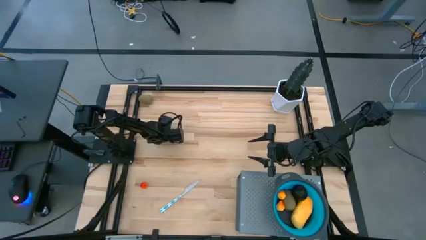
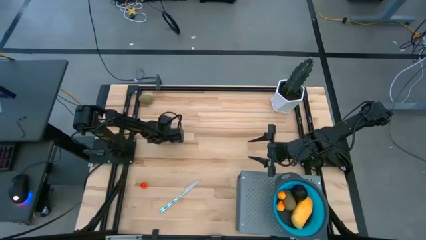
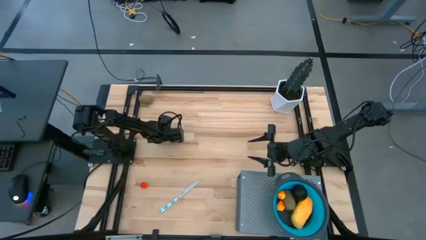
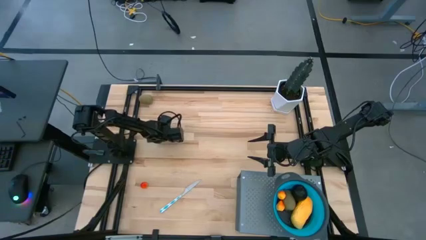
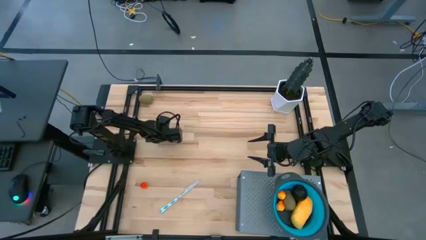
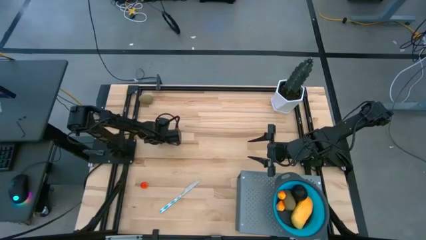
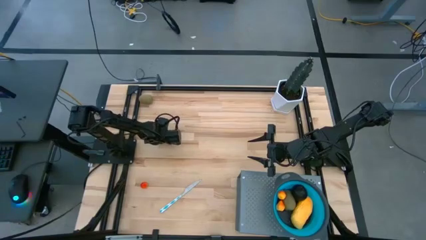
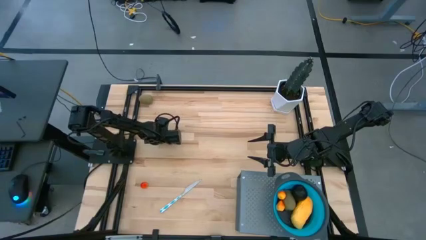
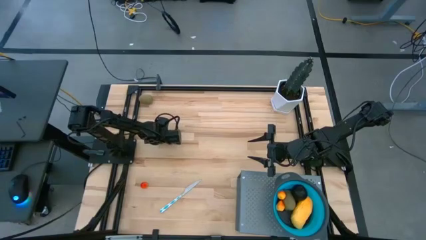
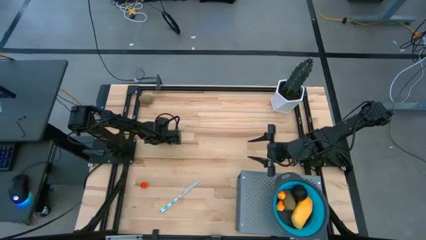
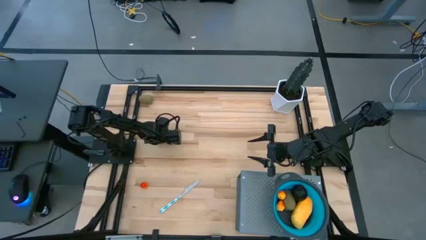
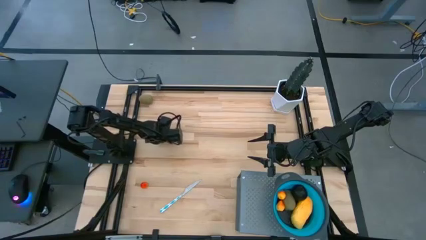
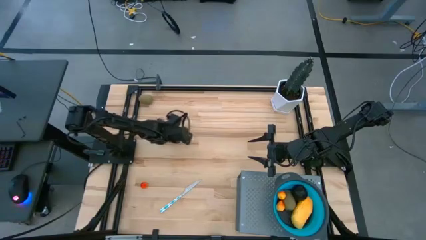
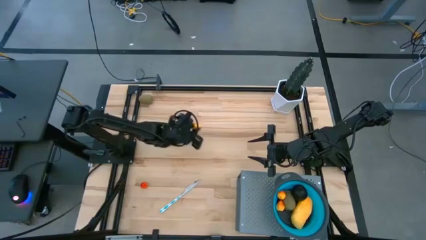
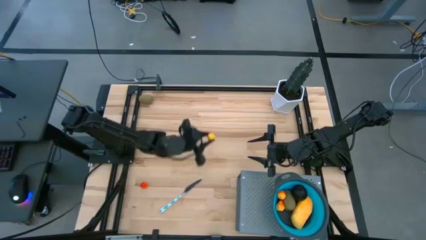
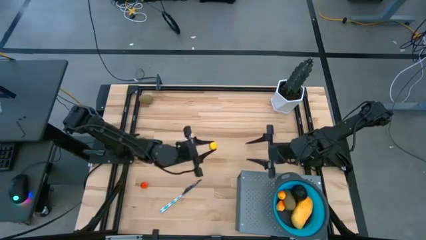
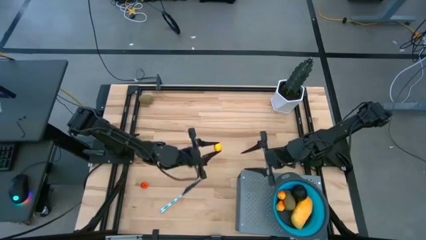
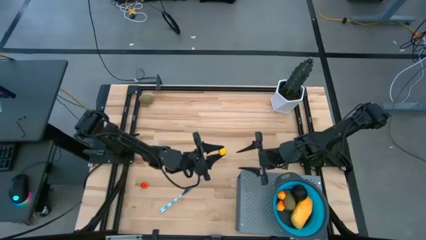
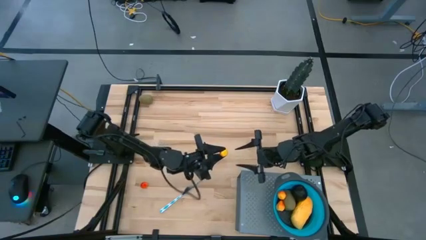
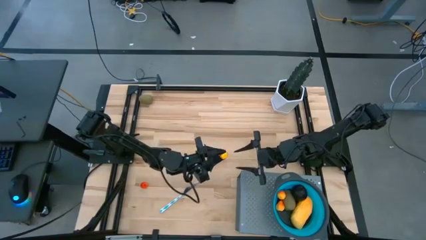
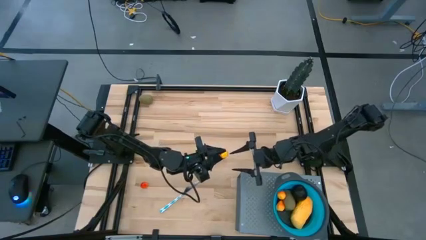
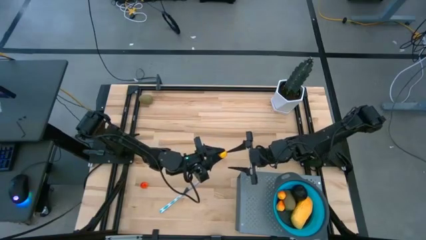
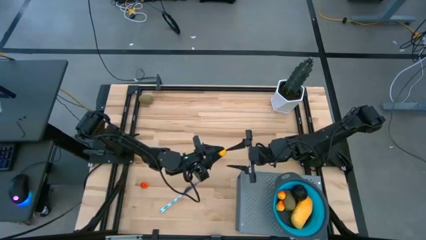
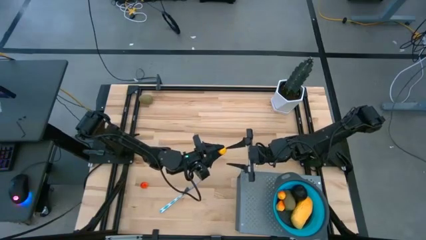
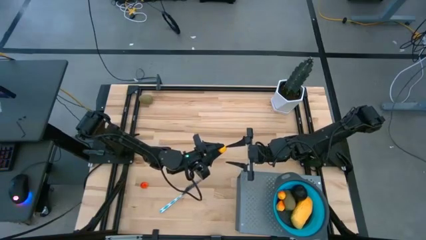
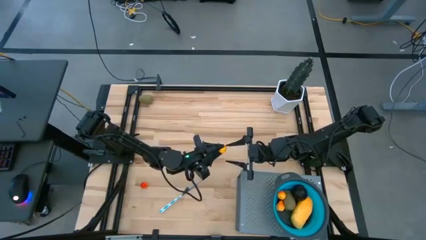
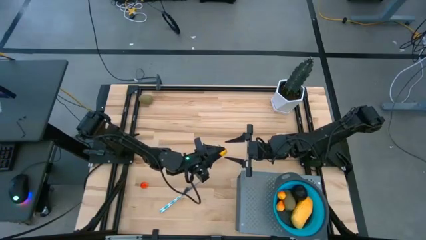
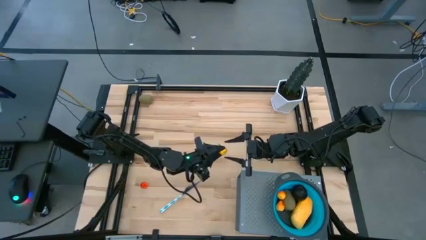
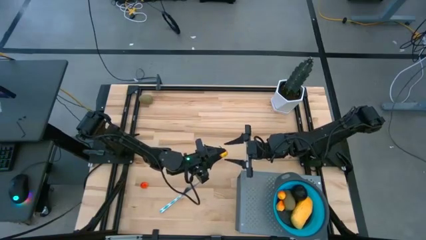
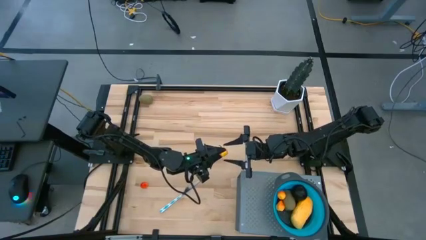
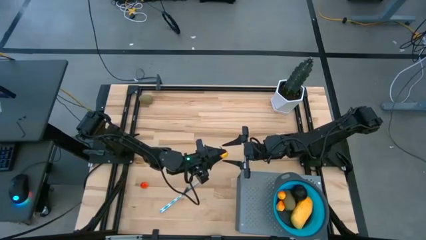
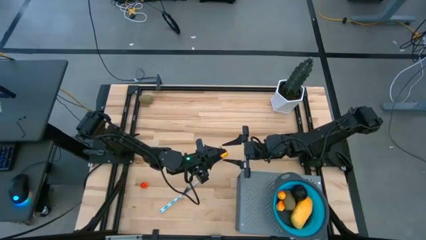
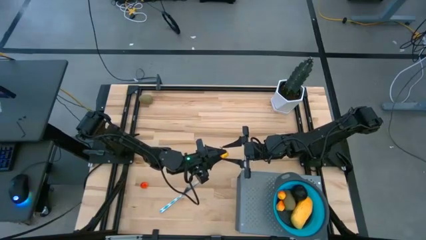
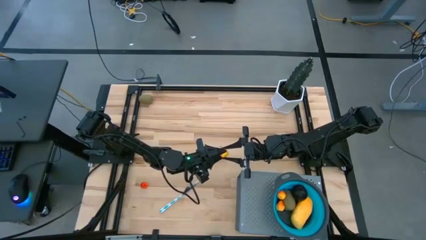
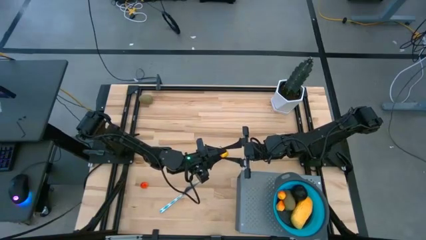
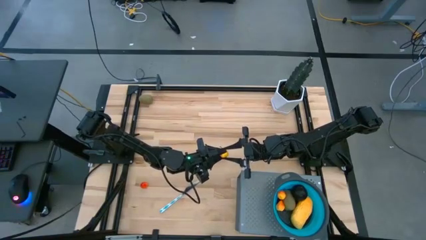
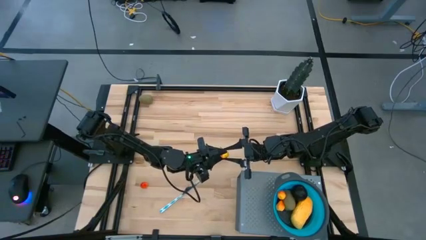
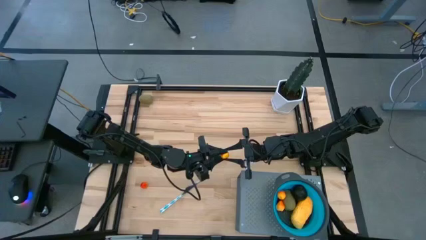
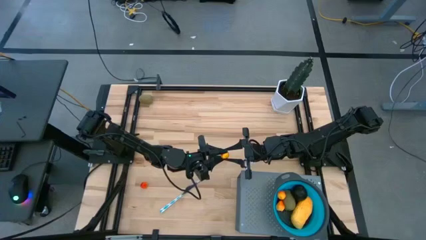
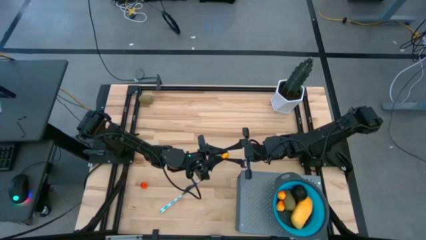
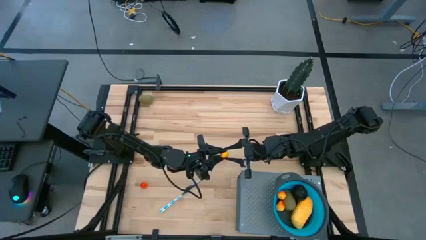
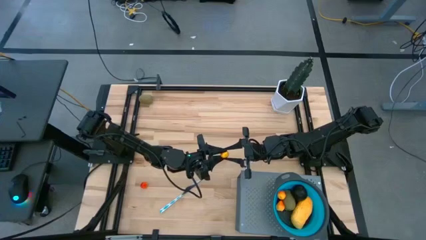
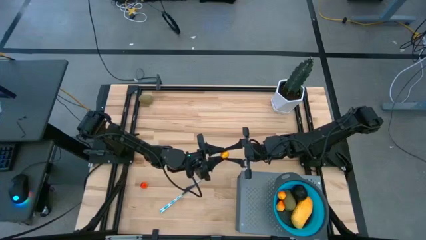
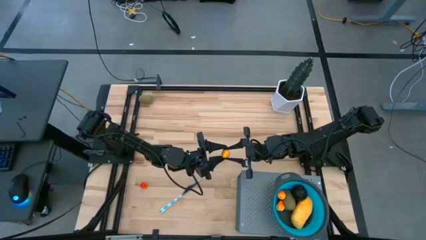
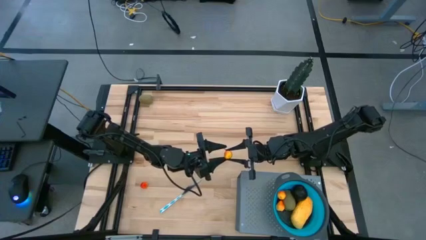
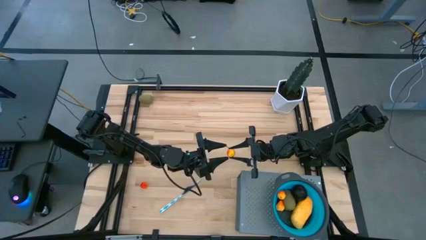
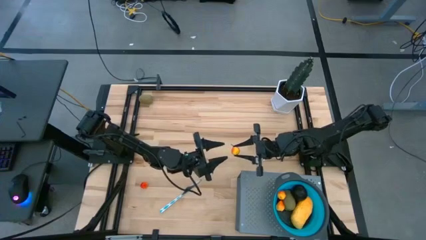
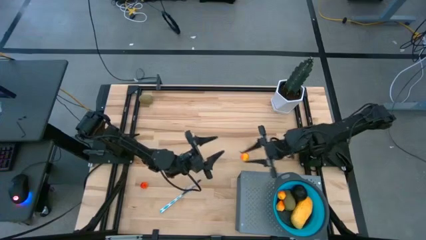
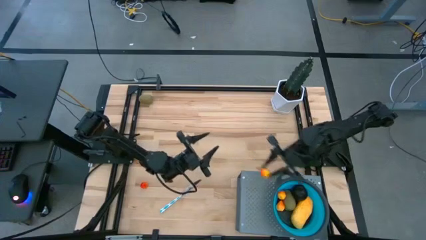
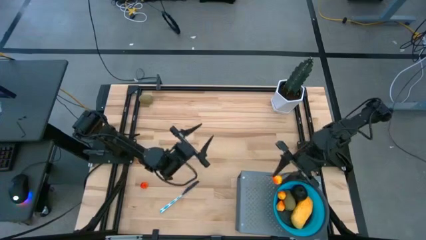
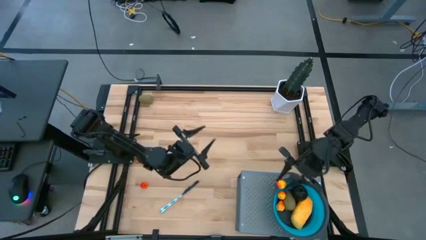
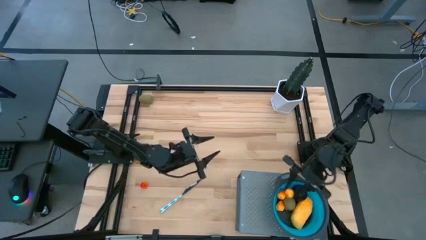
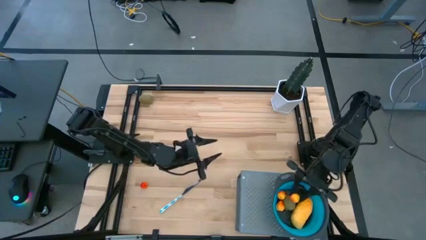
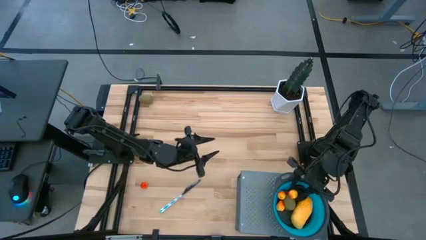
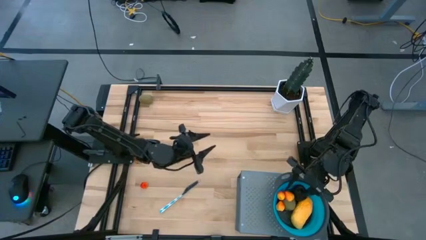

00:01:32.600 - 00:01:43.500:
Task: Pick & Place Fruit
Put the yellow pear into the blue strainer bowl on the shelf

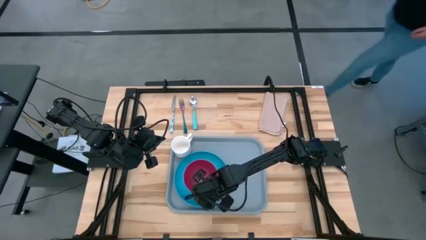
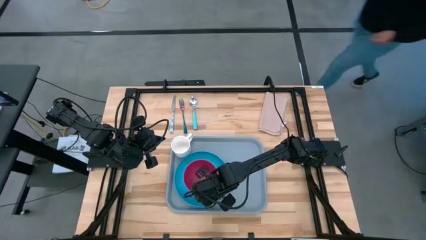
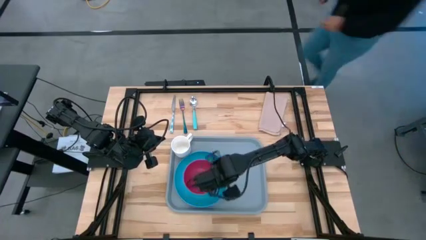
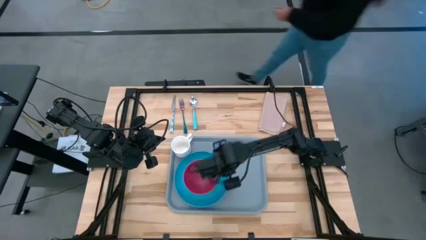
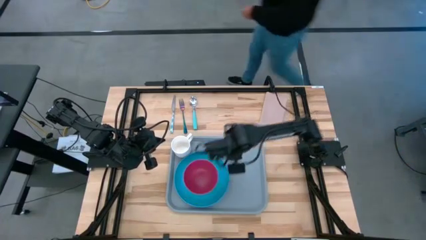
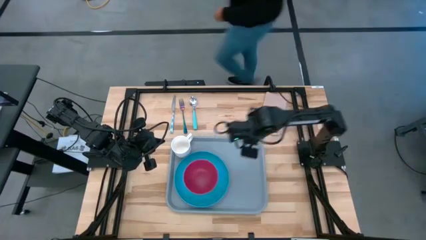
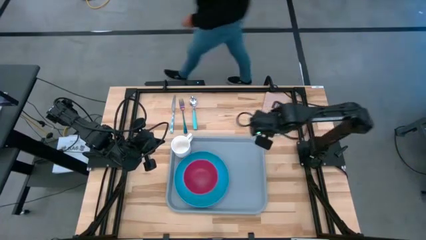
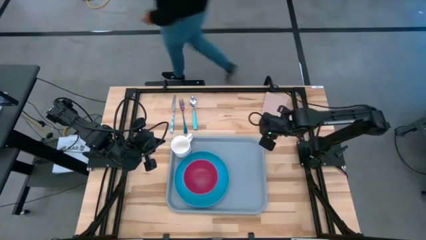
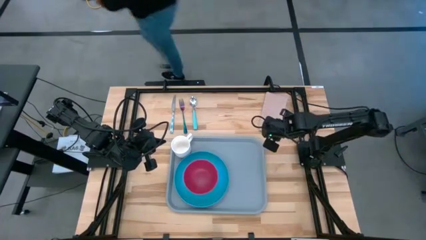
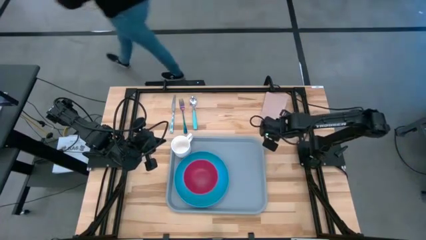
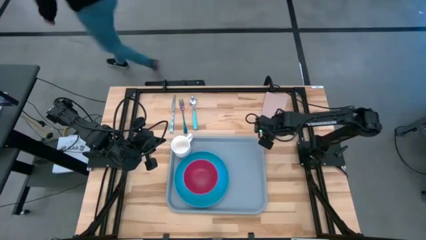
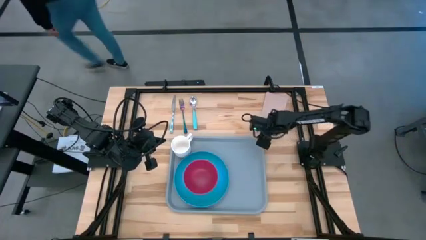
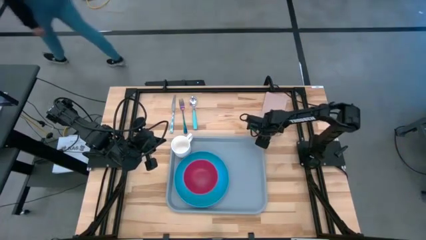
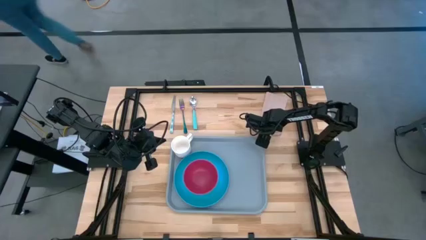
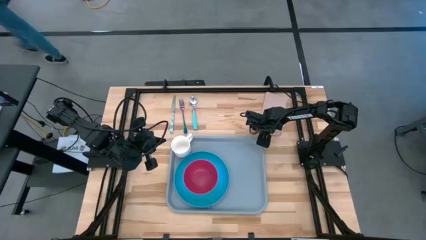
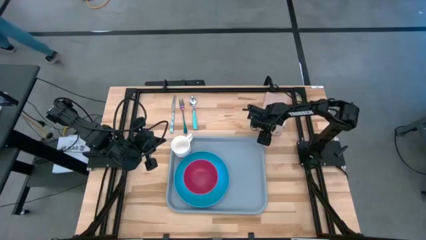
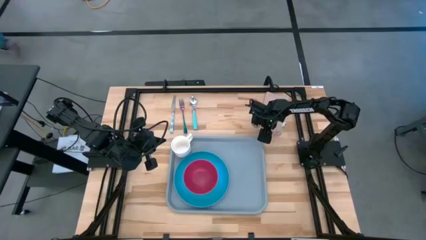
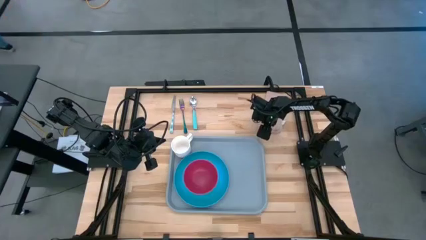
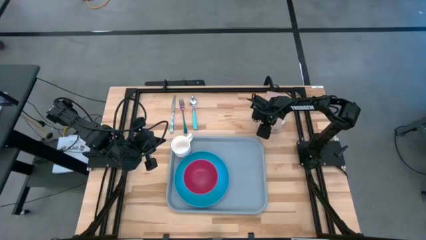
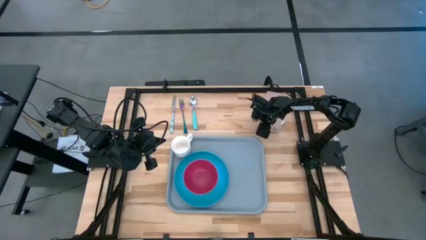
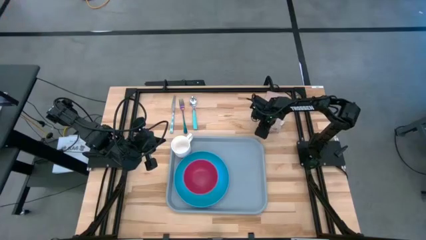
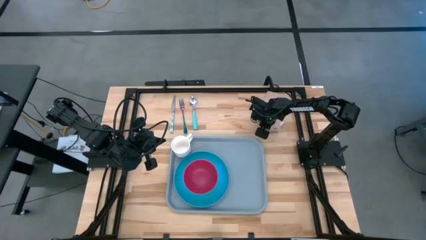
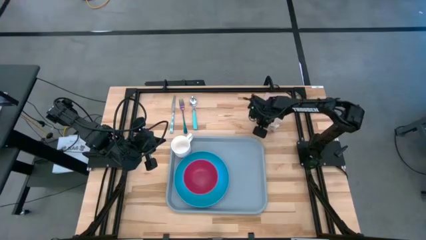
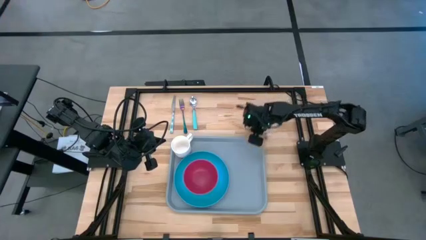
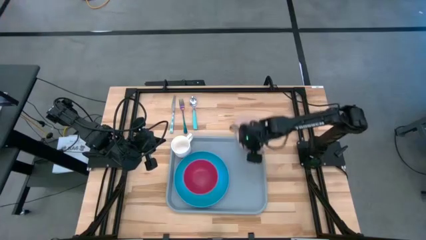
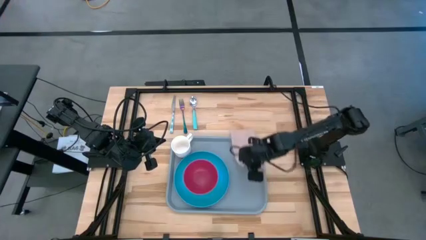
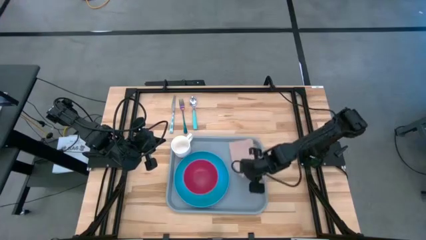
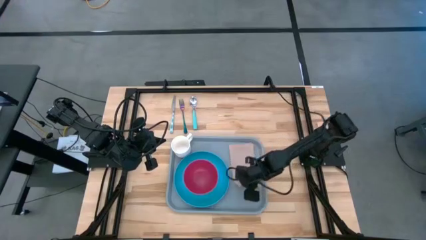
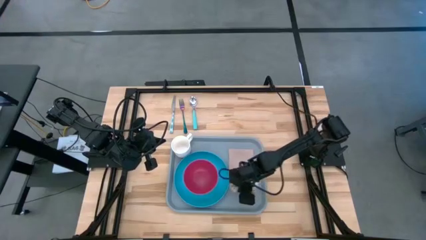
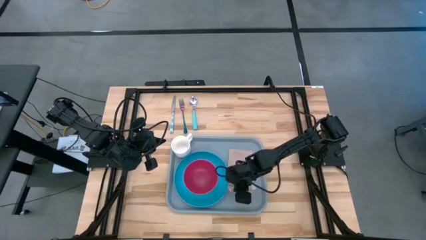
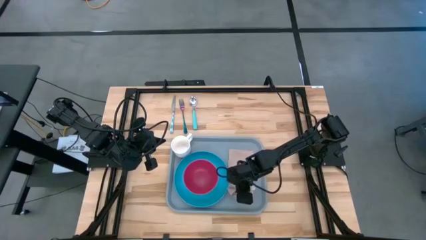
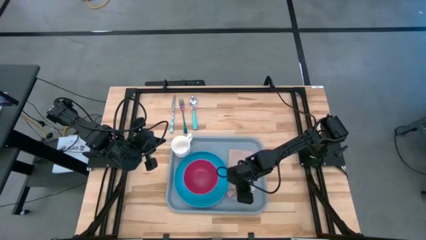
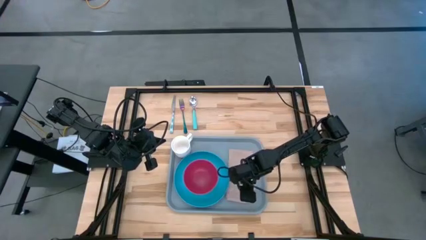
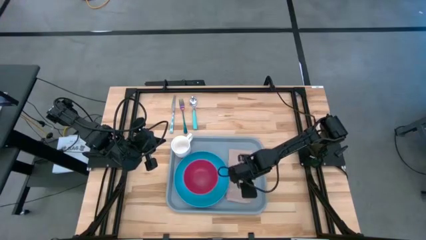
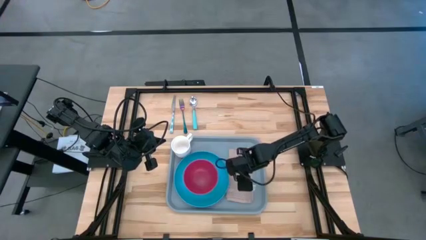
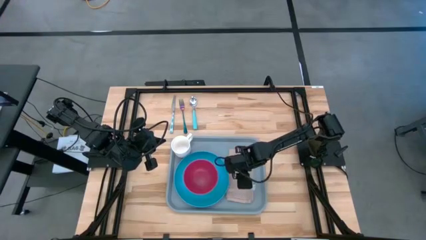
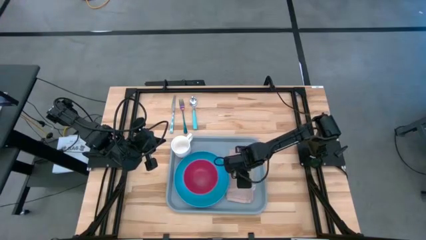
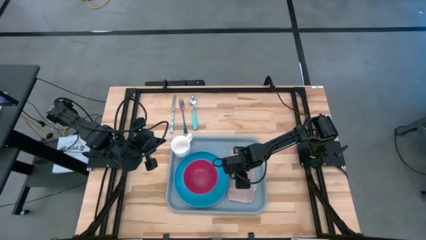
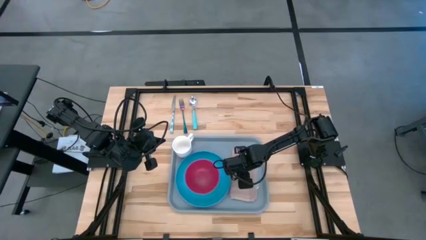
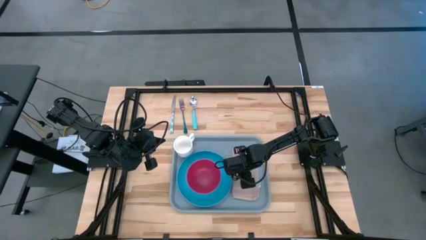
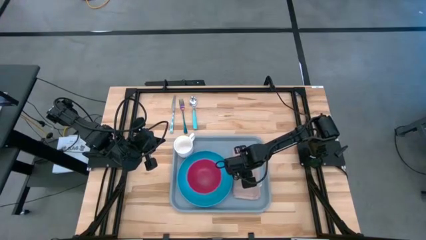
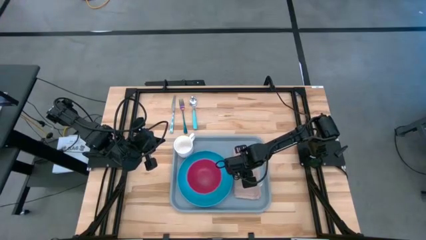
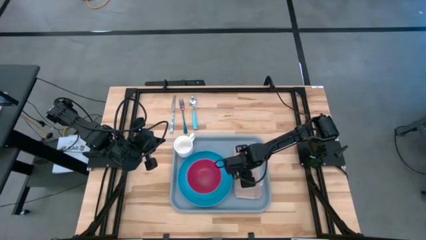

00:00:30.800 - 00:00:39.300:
Task: Set up tray
Put the gray napkin on the gray serving tray to the right of the blue plate
